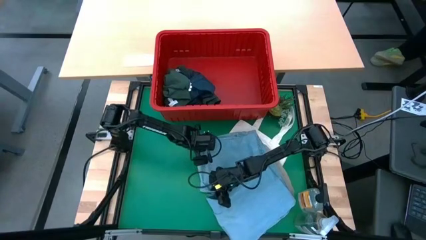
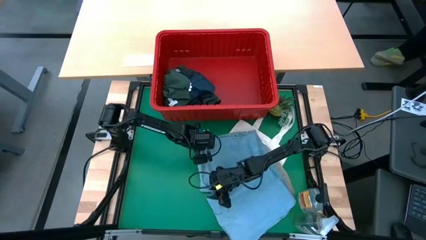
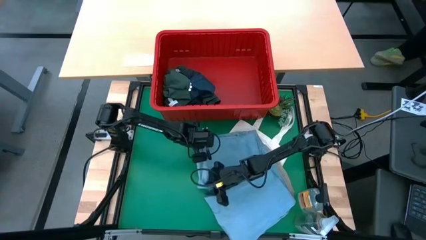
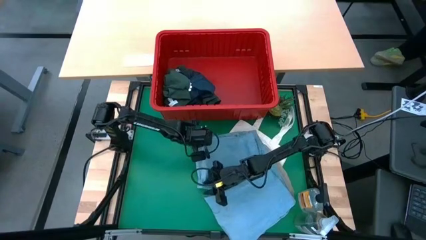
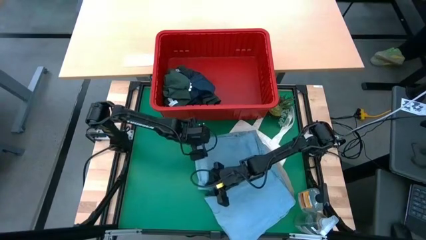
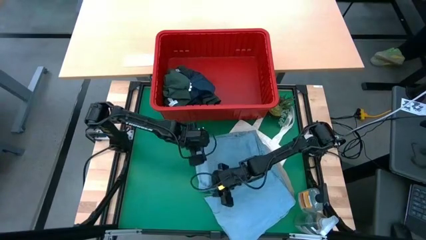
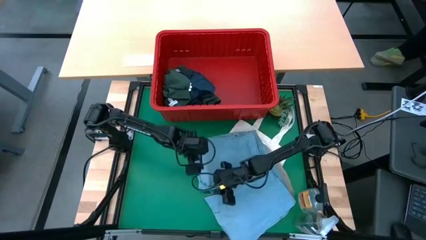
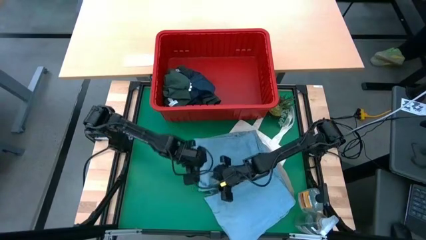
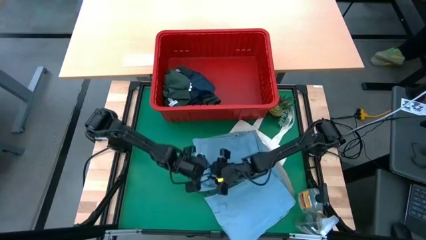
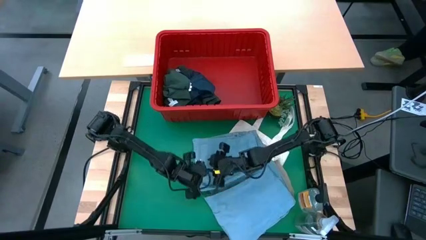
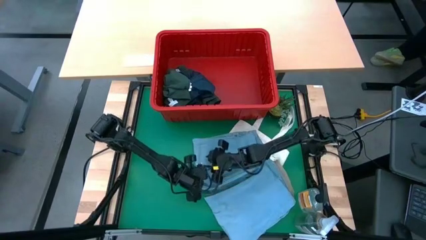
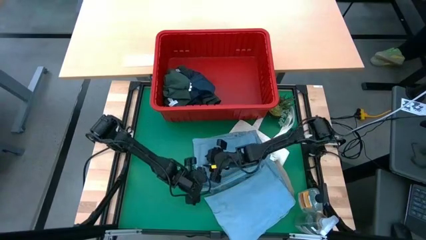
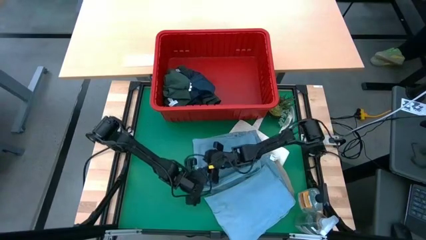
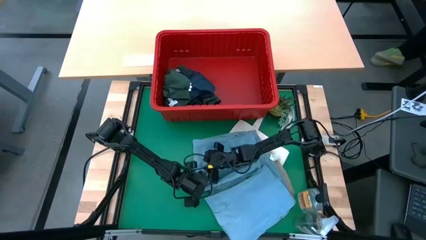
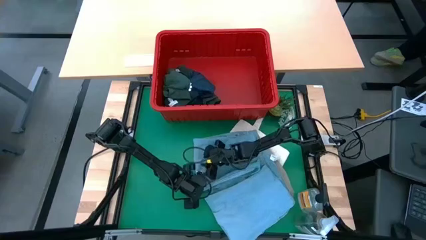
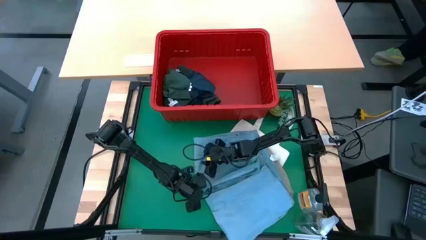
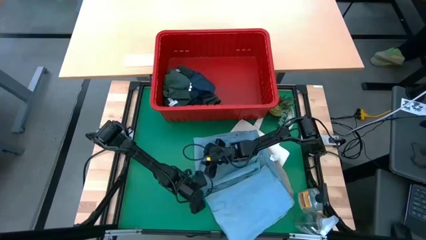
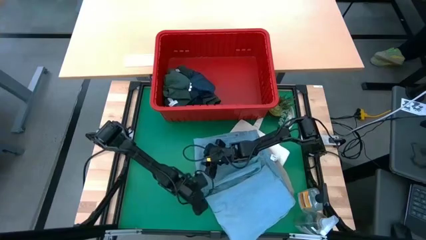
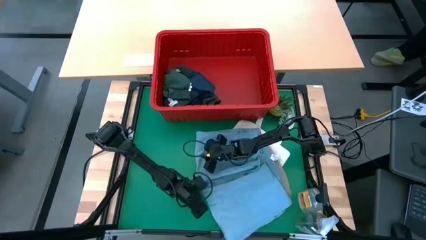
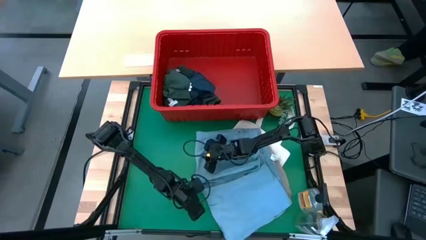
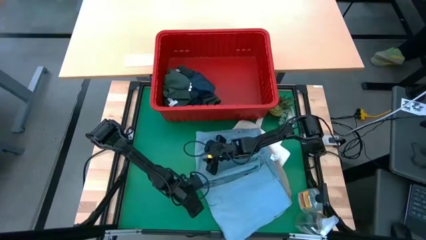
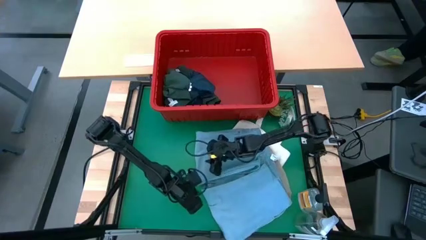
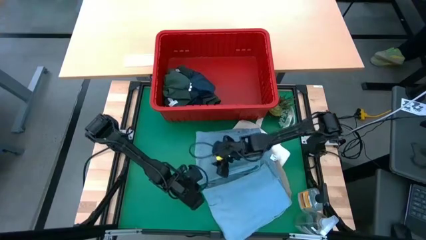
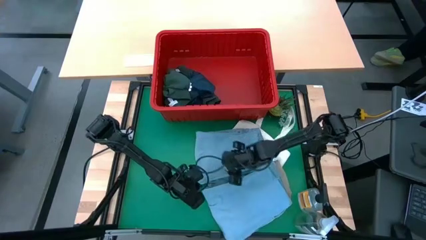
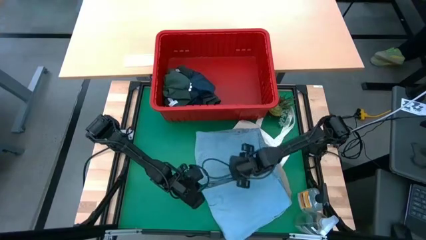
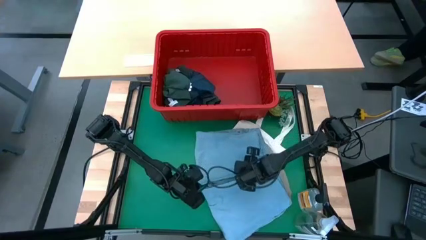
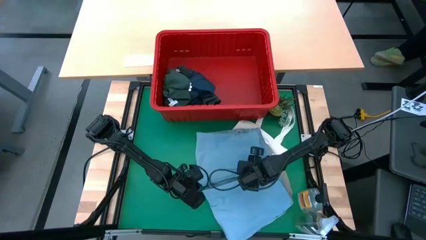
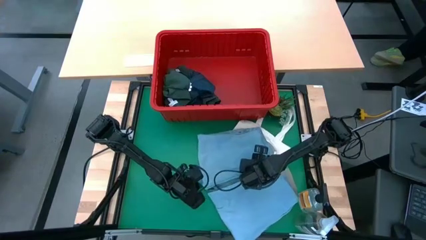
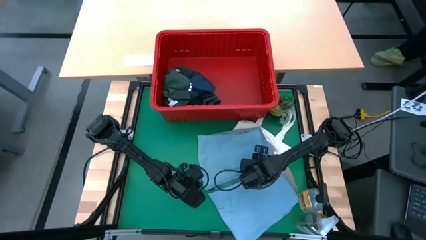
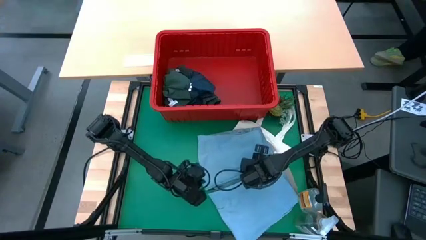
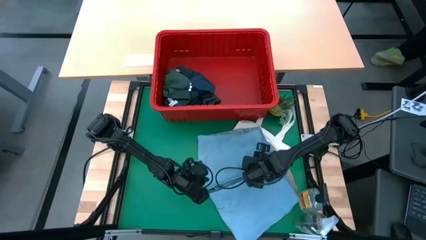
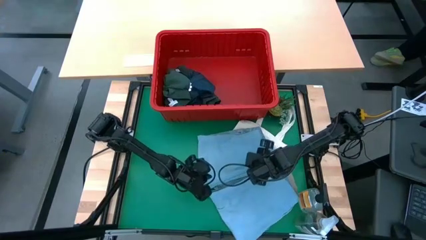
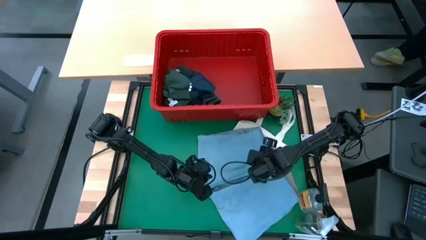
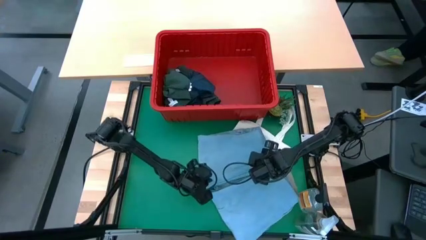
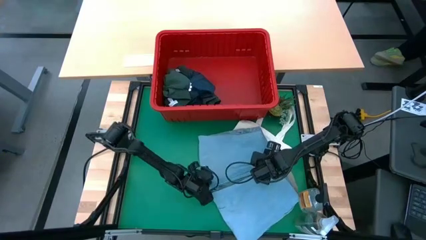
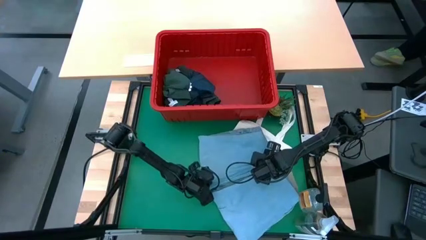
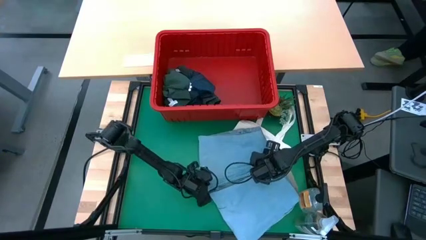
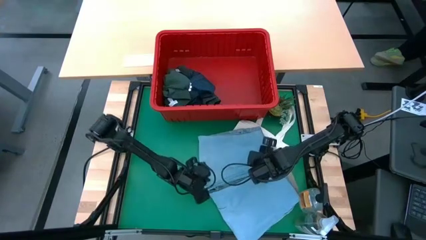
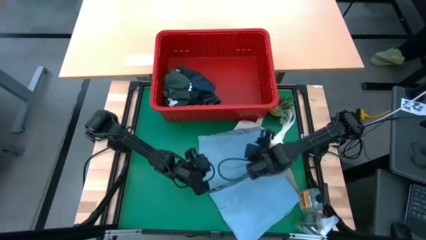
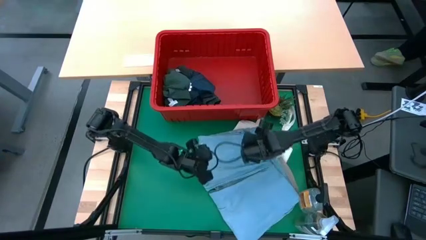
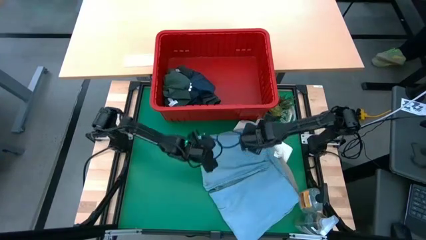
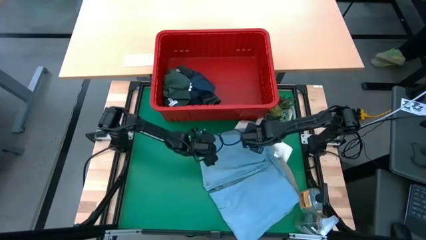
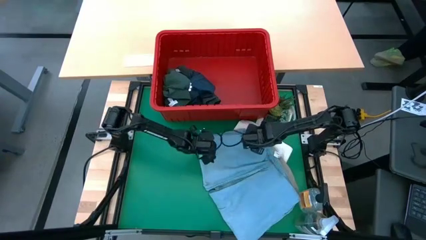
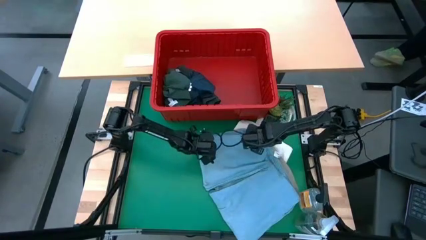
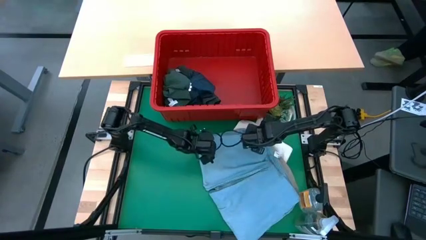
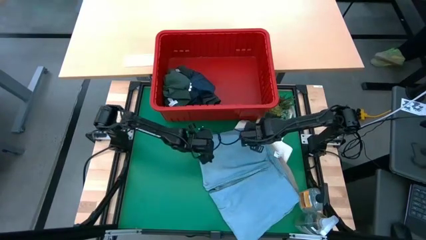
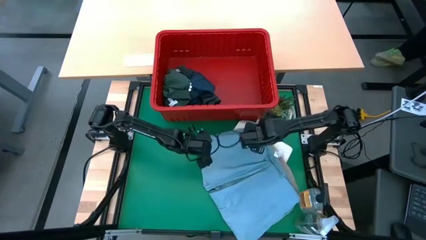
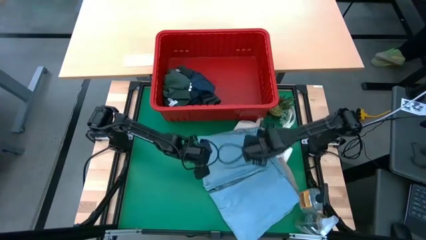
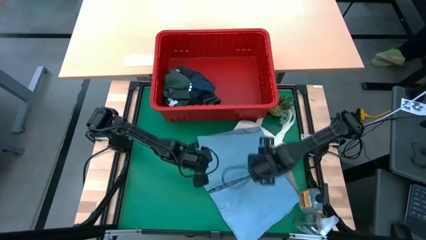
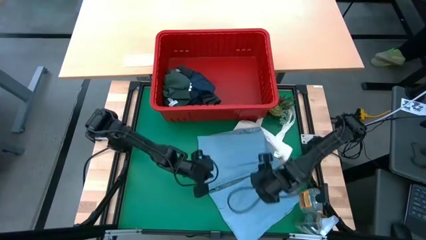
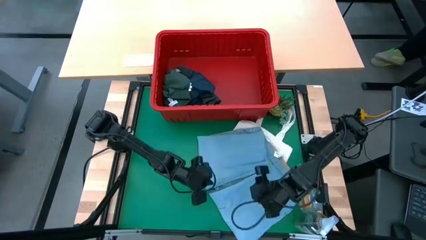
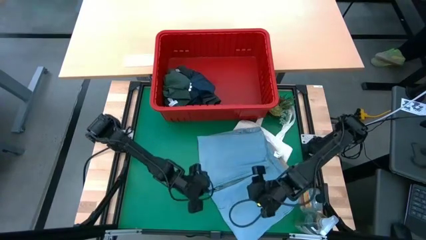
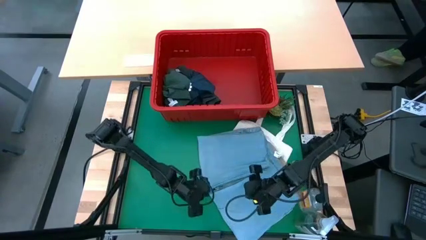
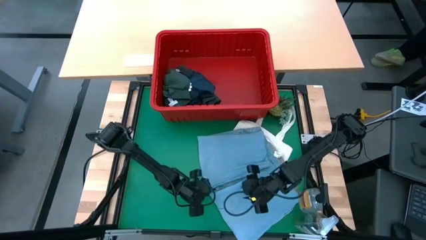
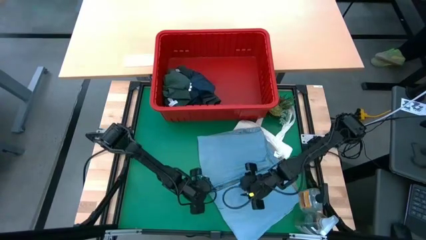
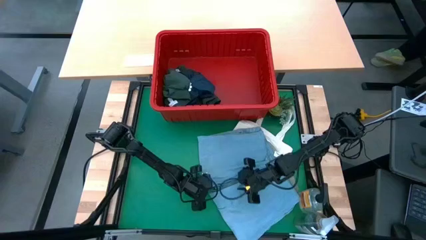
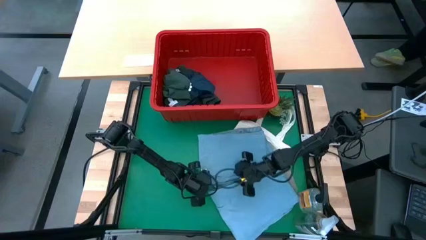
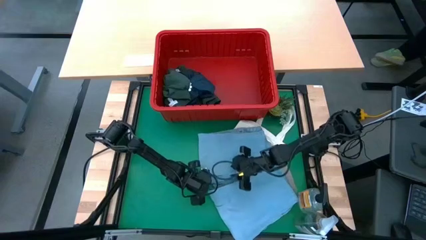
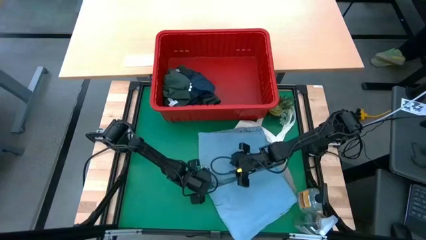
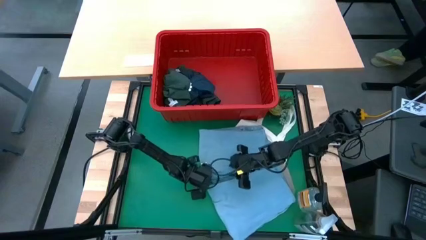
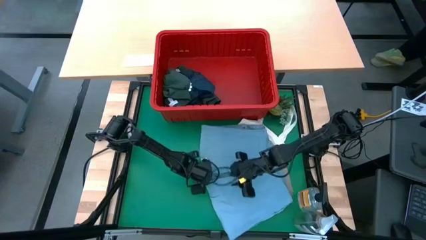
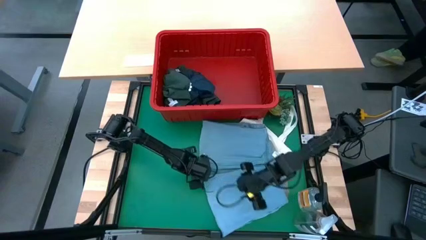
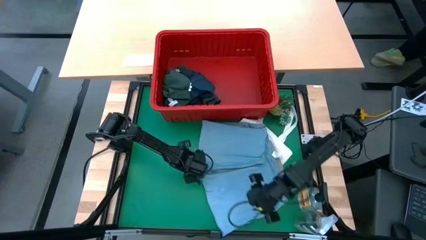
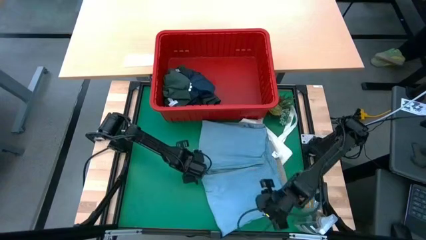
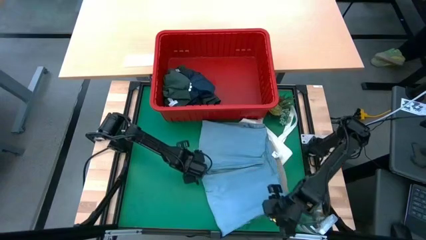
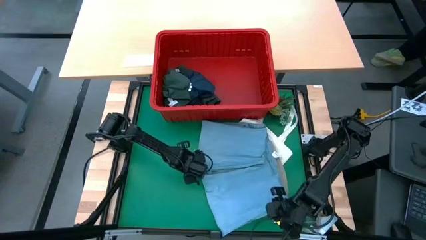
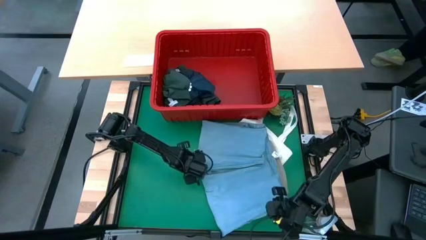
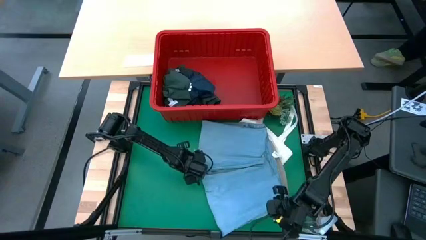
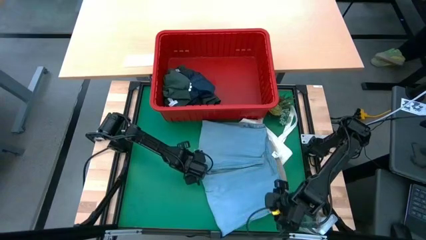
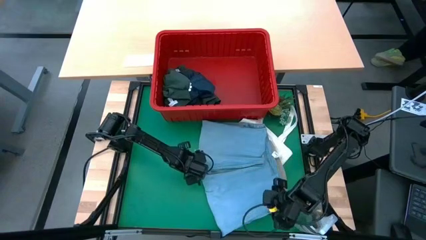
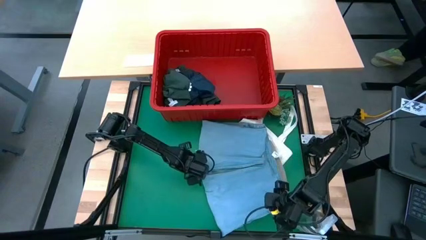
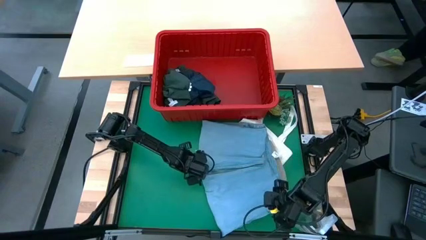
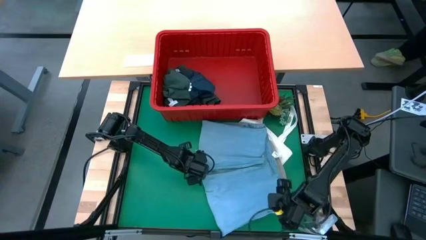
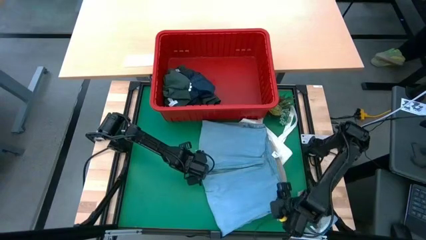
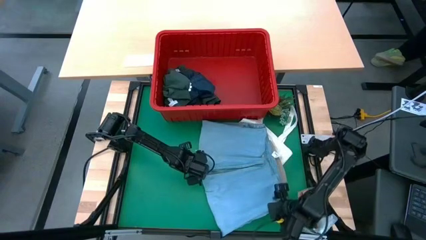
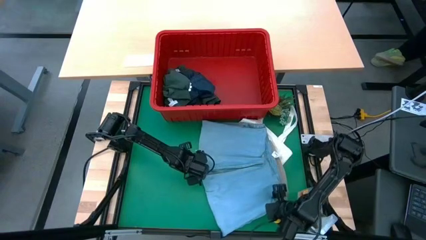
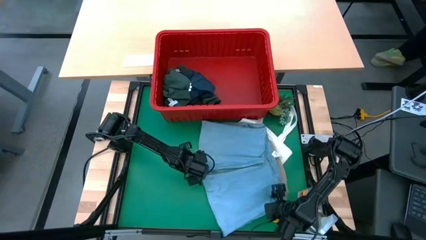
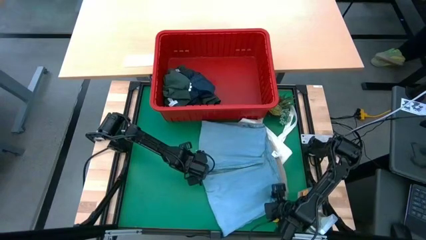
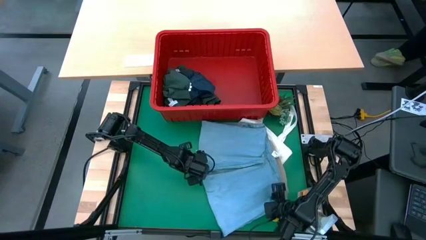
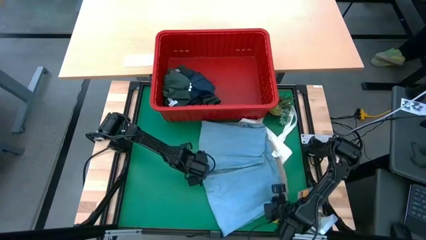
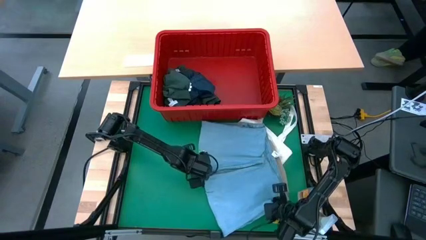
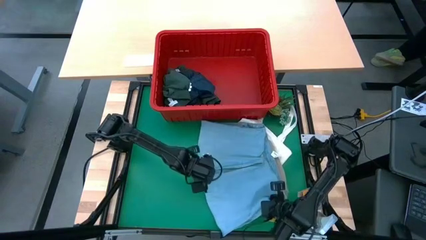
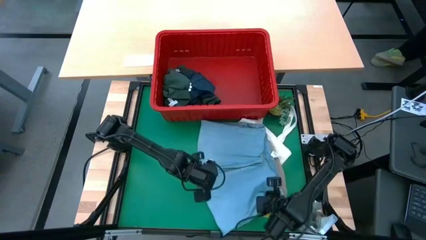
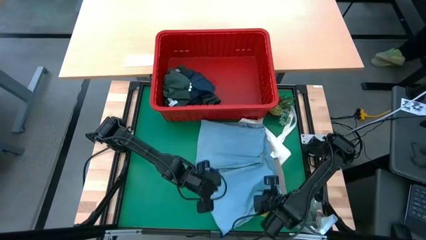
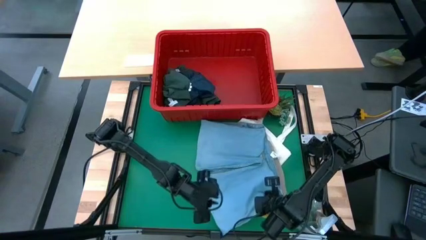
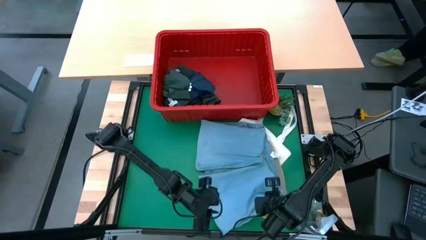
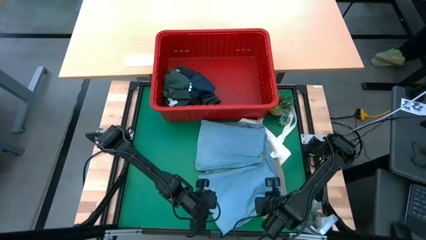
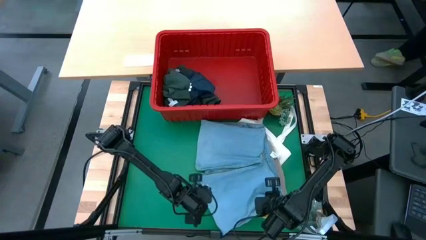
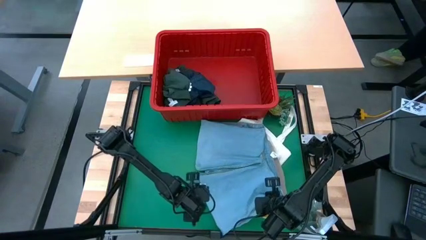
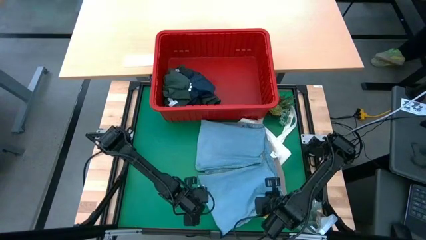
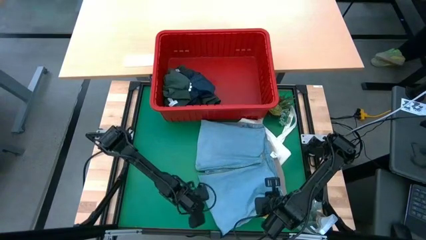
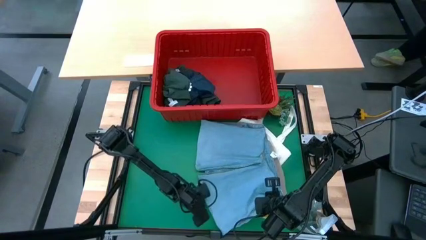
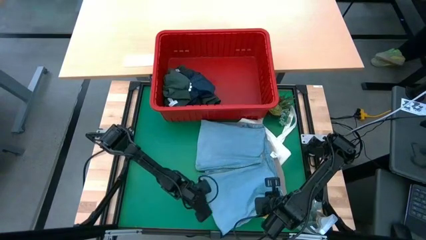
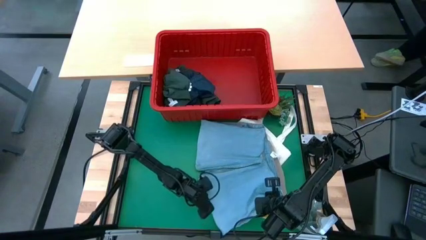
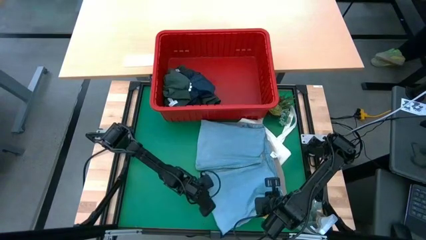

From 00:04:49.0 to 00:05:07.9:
Task: Fold Laundry from Bin
Fold the light blue jeans
